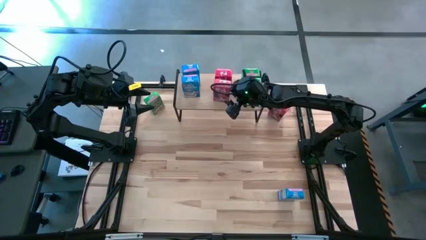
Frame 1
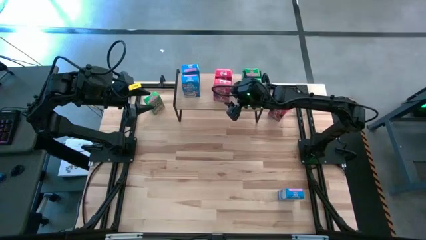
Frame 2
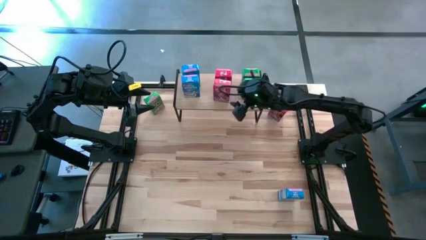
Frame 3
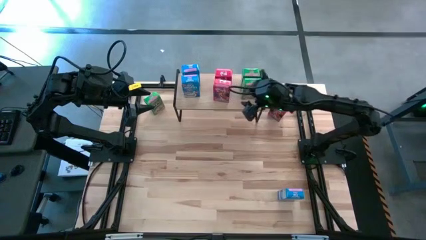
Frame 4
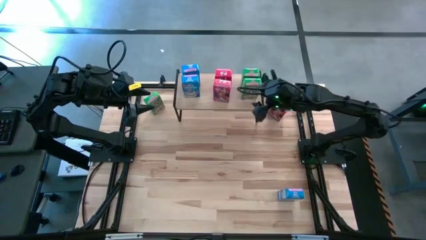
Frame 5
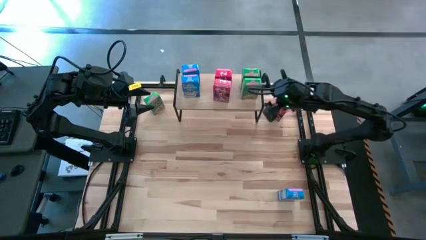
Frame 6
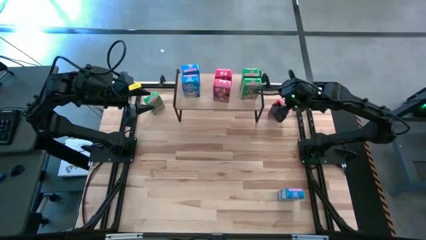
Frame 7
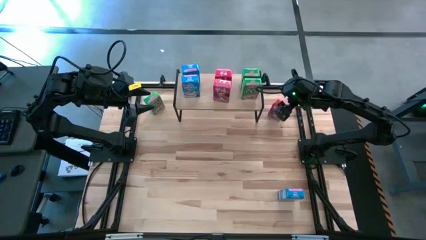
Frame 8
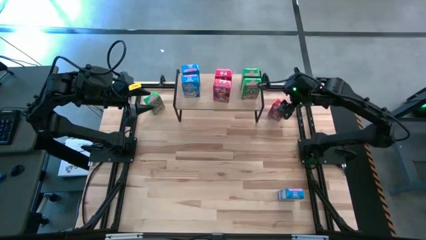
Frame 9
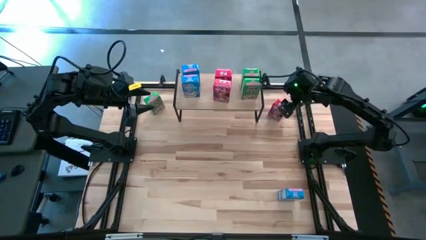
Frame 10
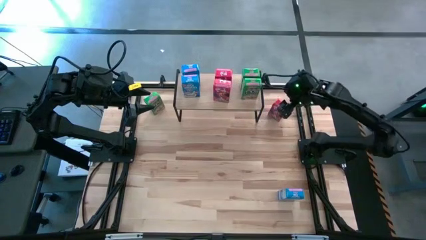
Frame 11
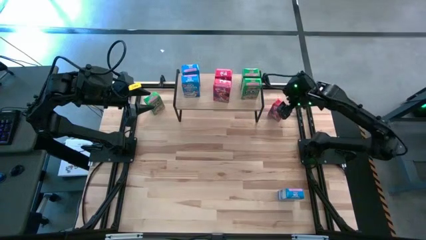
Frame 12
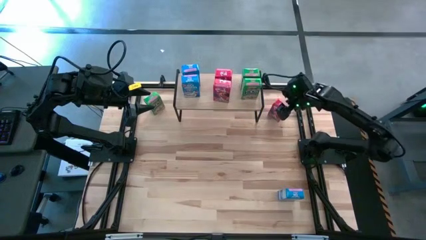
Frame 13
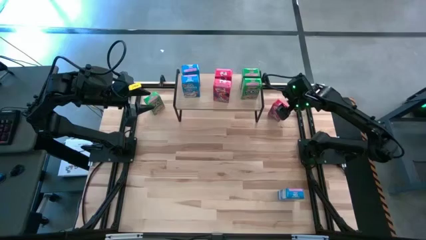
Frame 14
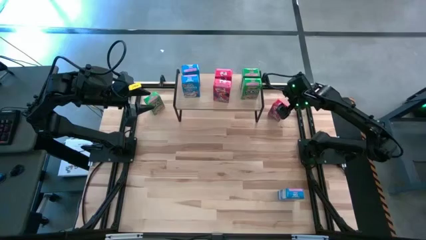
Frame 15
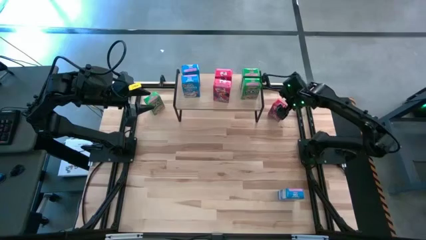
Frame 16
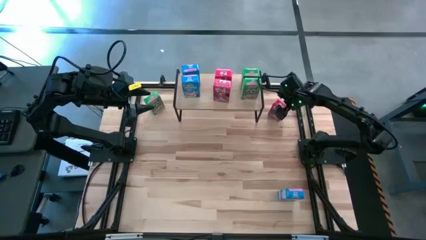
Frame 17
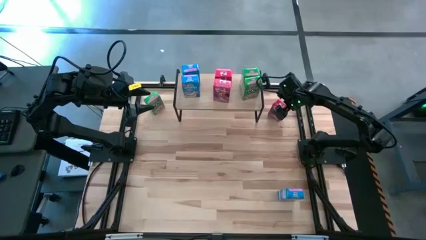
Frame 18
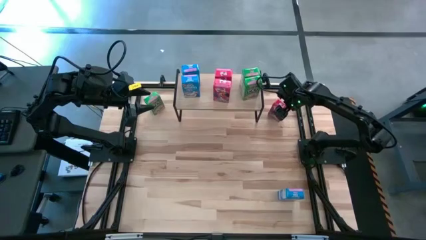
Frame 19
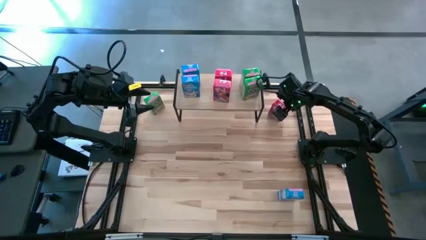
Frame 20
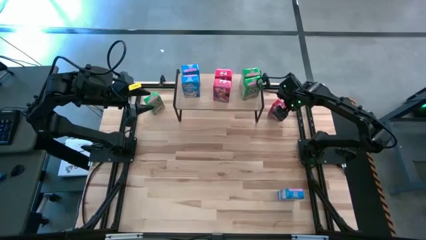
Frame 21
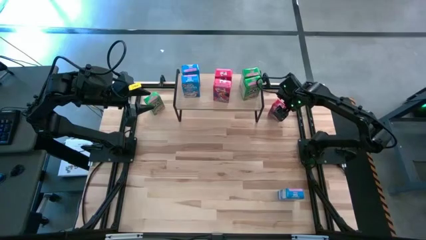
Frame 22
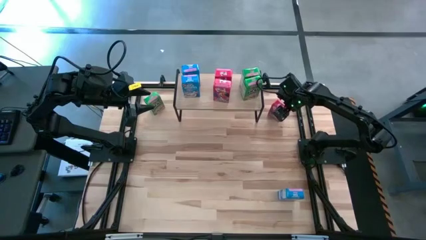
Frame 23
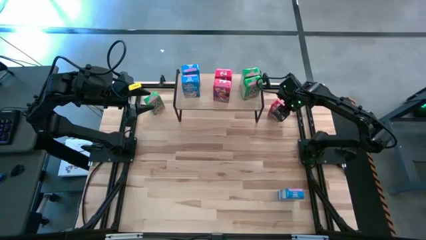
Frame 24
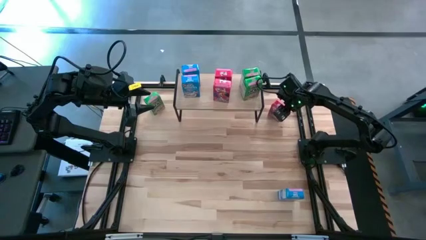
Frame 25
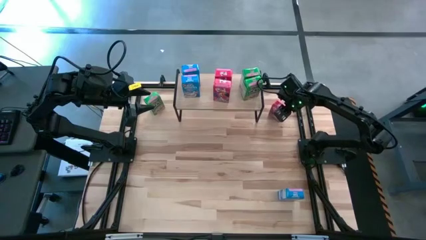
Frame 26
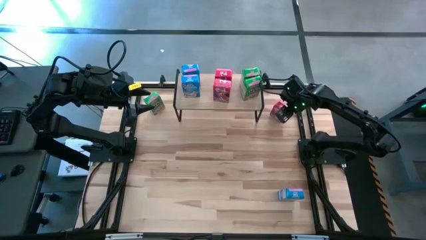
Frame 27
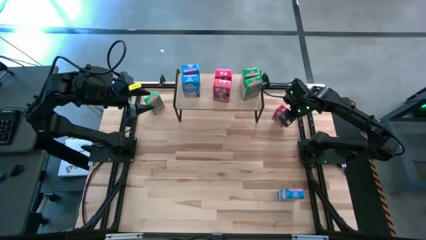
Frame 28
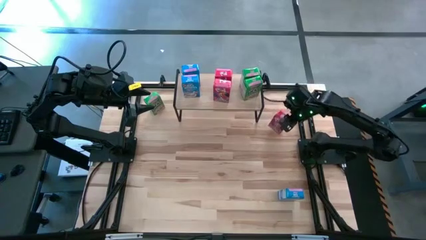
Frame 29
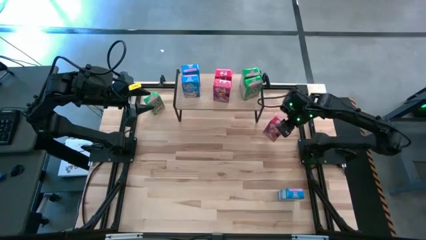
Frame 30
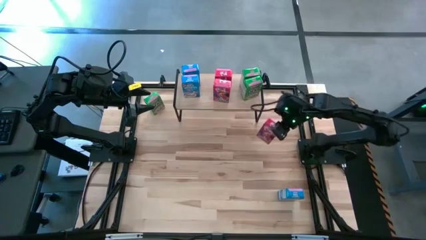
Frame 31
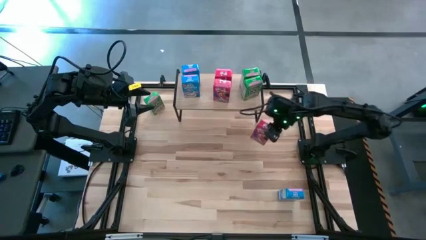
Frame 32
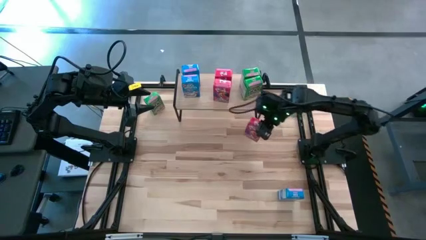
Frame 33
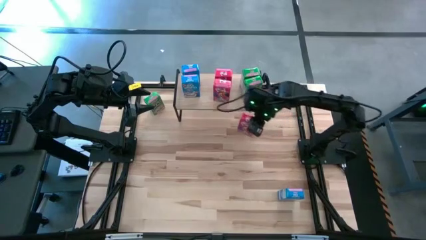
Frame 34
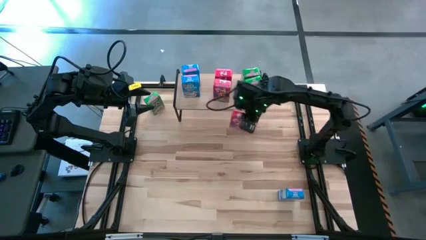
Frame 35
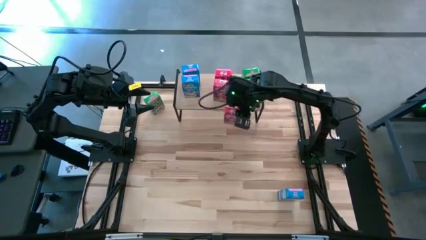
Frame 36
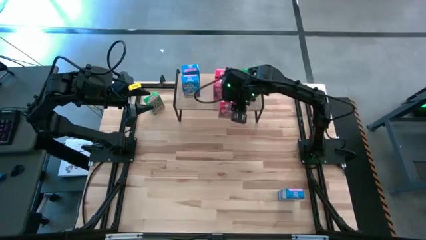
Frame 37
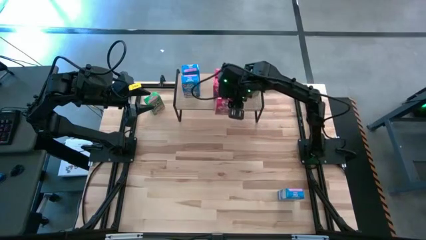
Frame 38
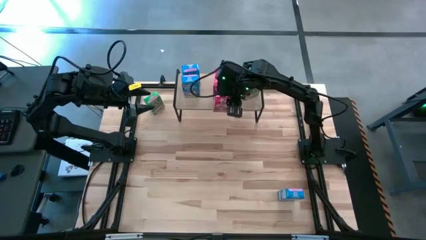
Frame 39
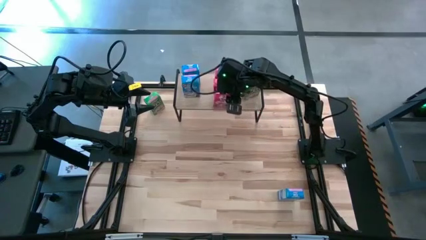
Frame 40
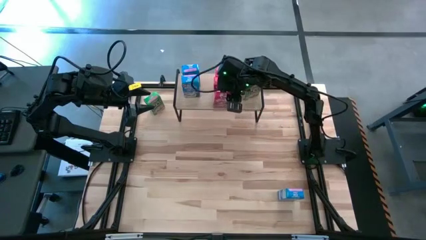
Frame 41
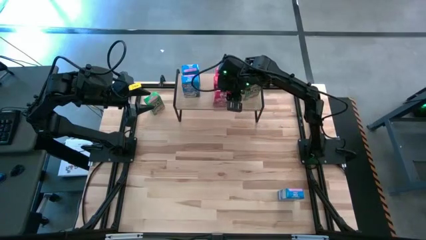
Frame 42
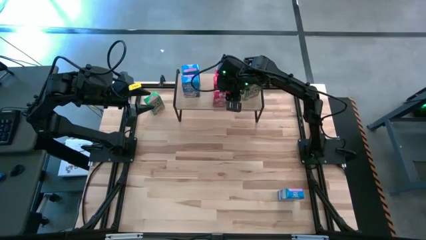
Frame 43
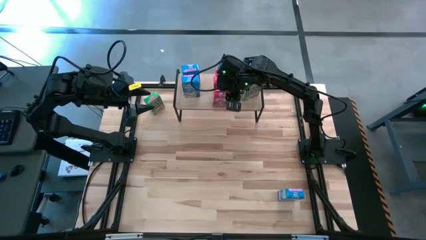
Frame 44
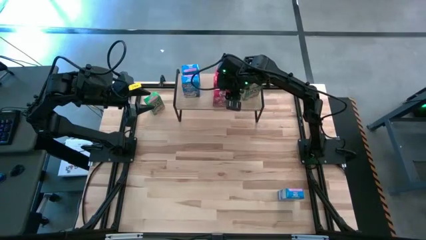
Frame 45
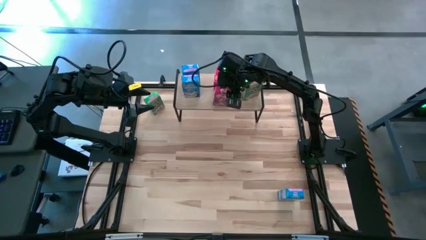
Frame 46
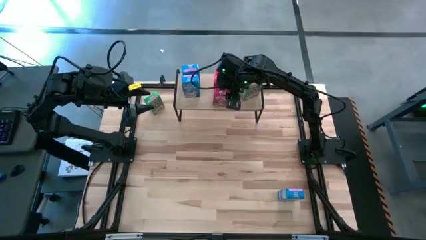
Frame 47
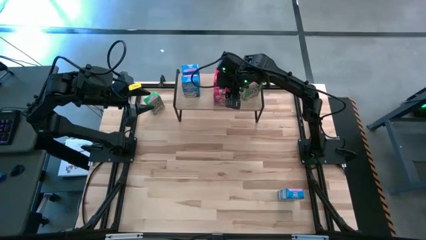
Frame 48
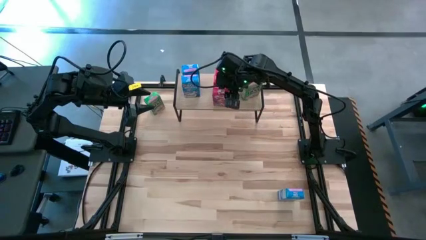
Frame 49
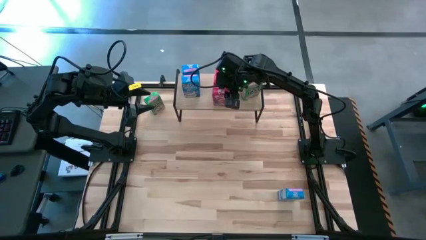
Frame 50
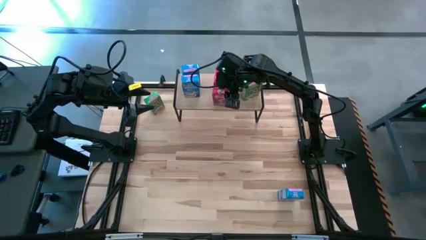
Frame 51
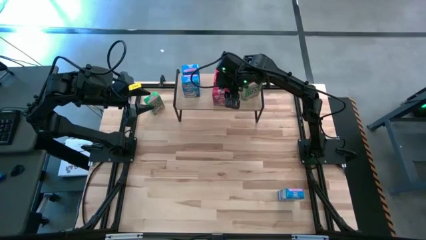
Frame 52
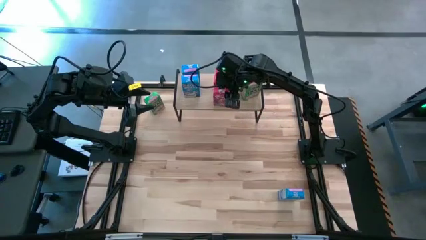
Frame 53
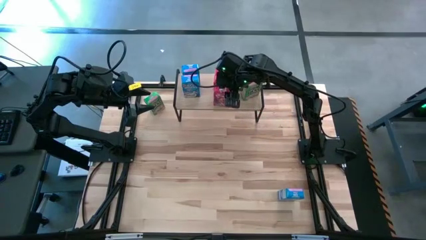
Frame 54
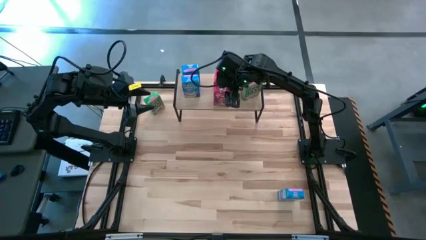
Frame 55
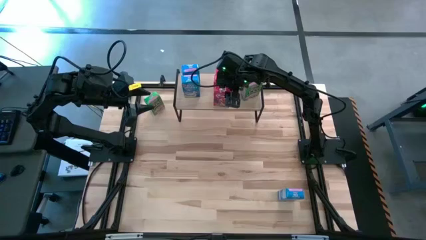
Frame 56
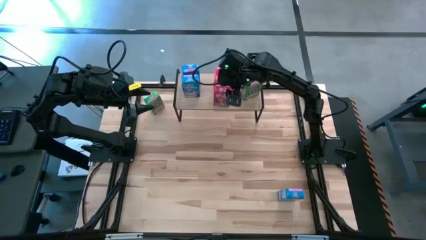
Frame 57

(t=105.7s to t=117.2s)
Task: Stack cereal on shelf
Put the red cereal box on the shelf aligned with the other red cereal boxes

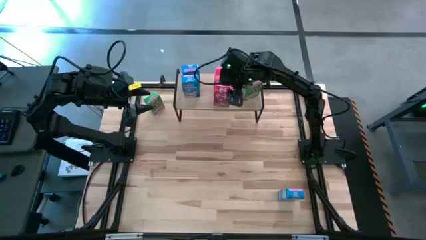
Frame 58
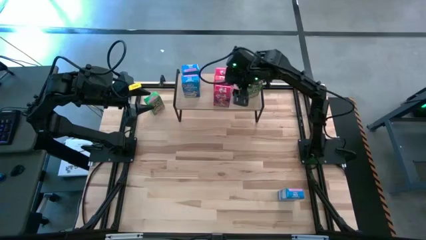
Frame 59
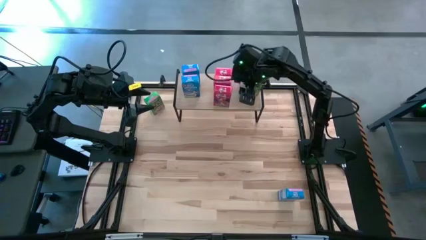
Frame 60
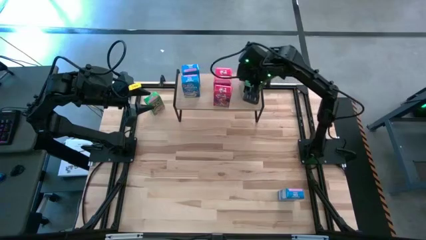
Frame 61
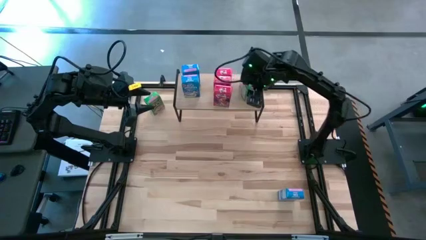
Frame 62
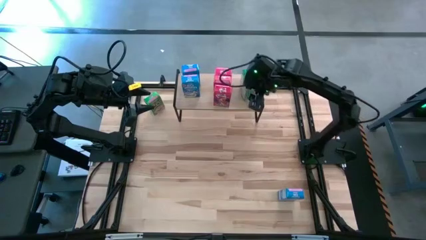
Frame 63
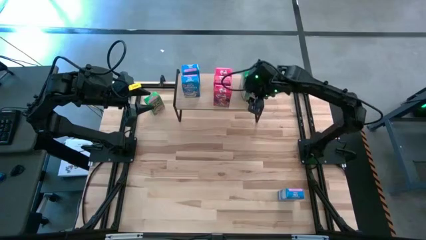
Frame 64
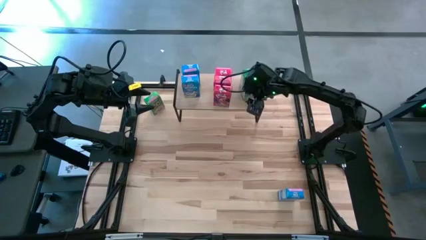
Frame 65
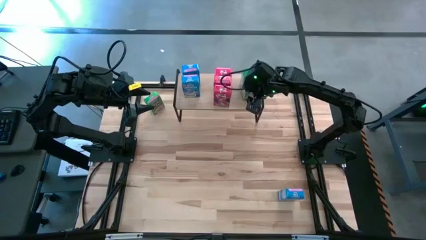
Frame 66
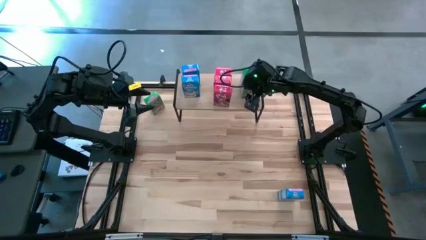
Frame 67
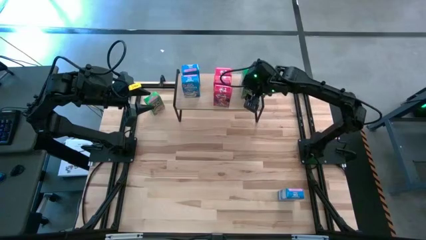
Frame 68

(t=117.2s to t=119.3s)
Adjust the green cereal box on the shelf

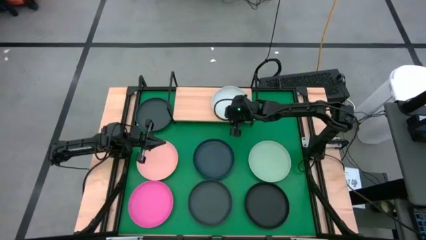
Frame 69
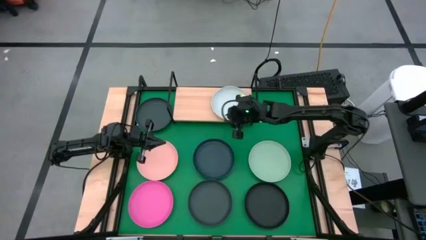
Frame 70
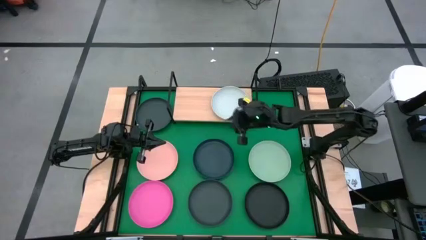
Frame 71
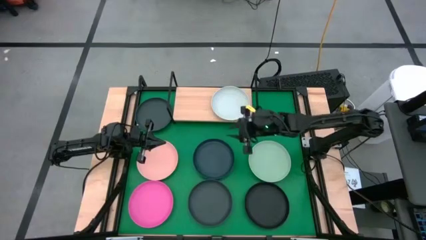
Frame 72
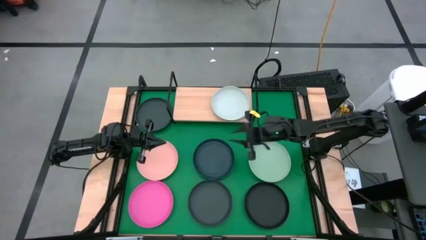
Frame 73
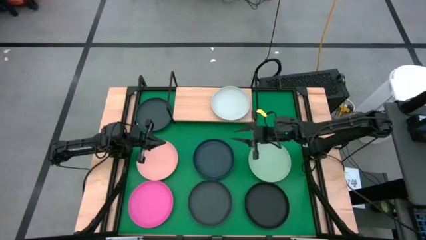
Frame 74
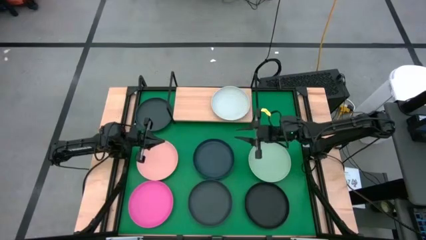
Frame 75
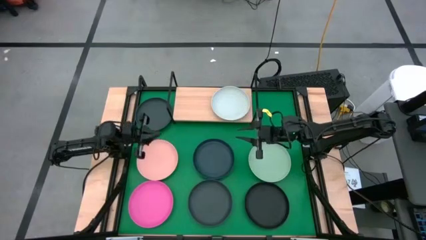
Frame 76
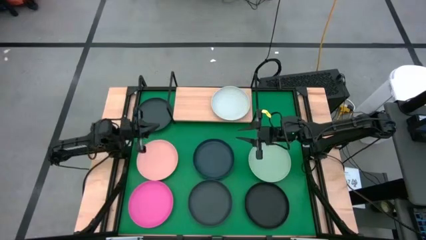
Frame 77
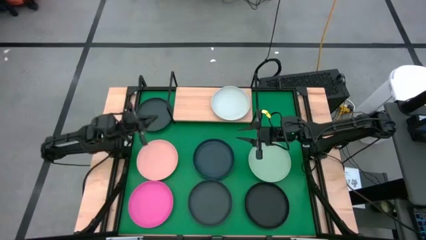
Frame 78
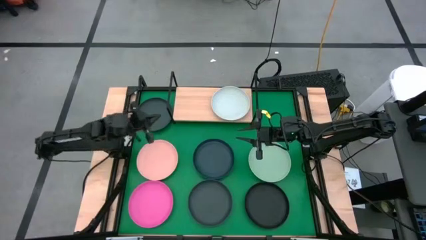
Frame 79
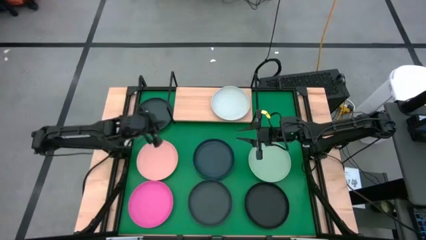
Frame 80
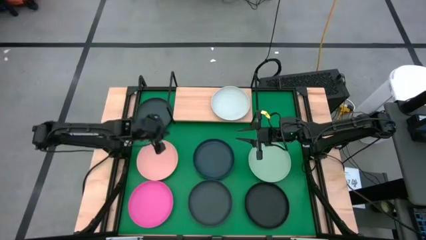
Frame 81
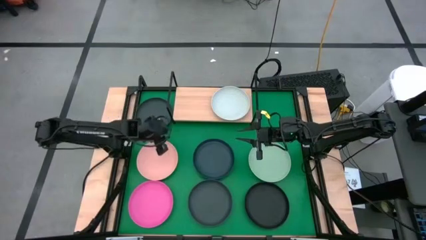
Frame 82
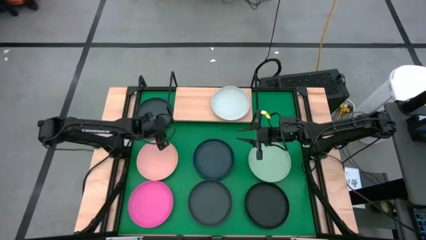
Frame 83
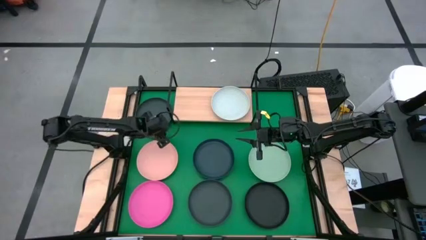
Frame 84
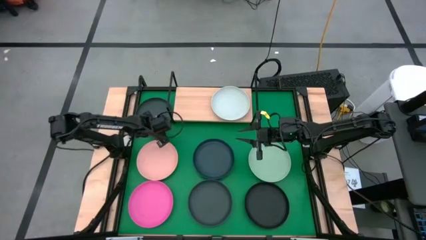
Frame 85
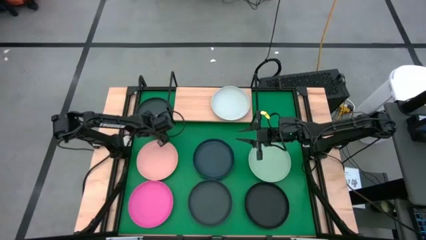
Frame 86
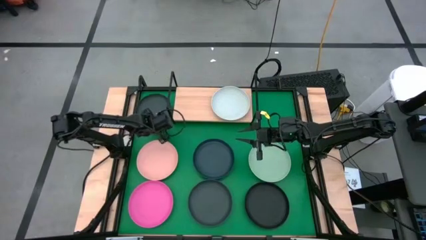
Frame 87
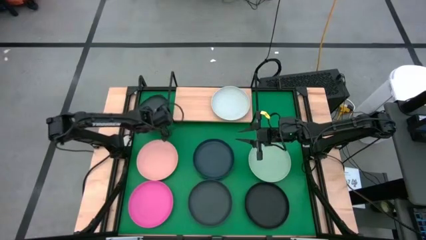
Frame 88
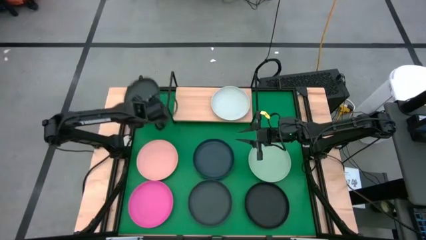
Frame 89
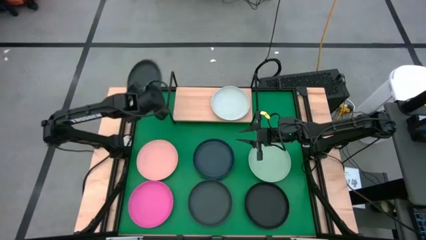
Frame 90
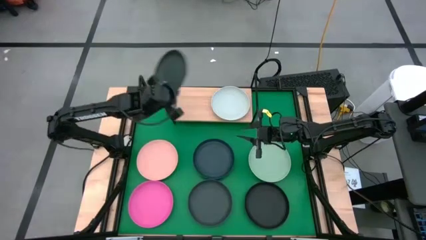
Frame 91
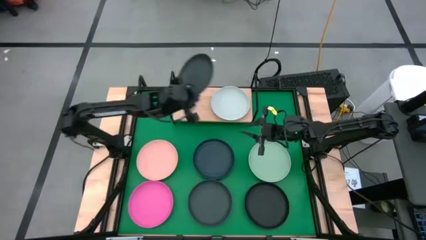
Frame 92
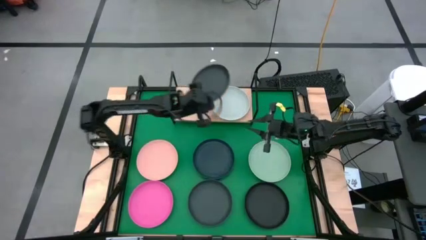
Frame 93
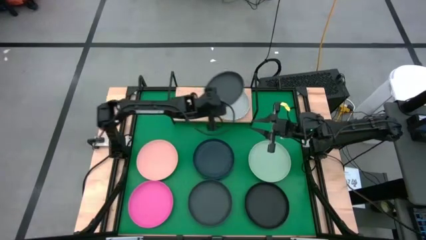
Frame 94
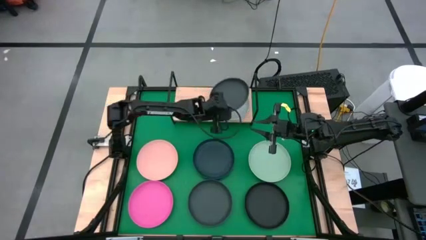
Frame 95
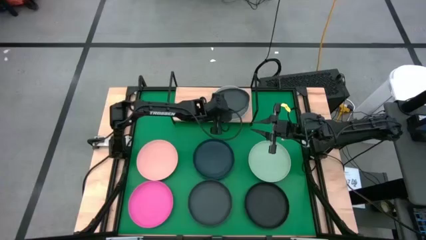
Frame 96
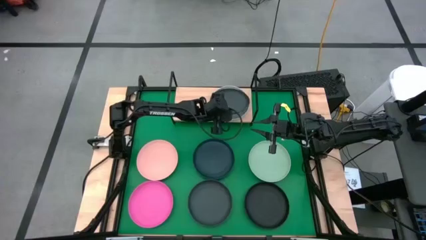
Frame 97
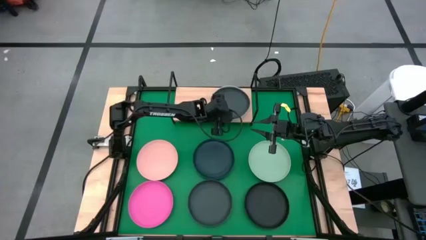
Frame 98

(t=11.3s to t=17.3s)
Task: Place and stack plates onto a shelf
Stack the top black plate on top of the white plate on the shelf
